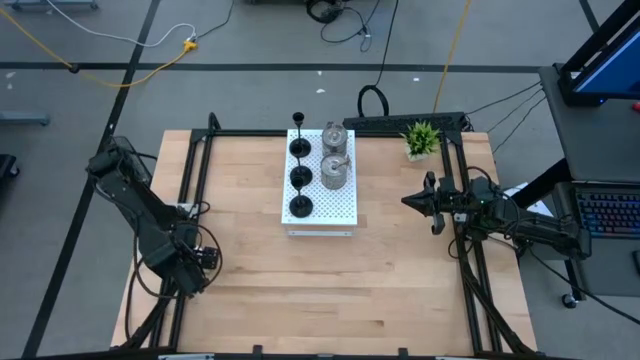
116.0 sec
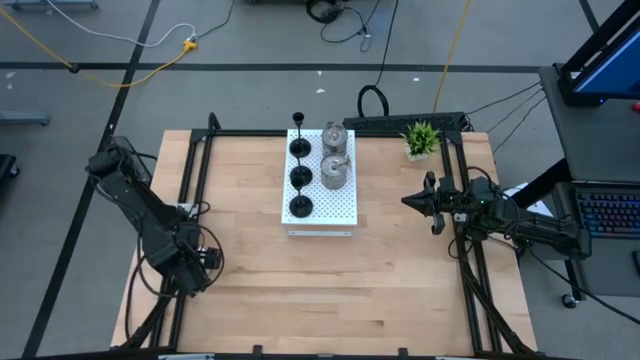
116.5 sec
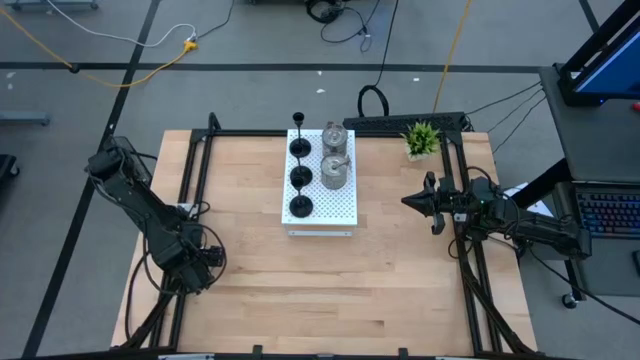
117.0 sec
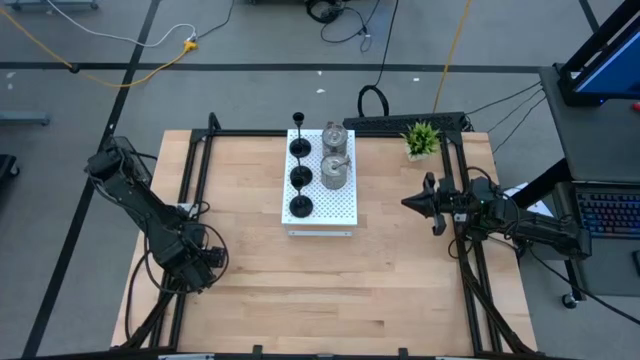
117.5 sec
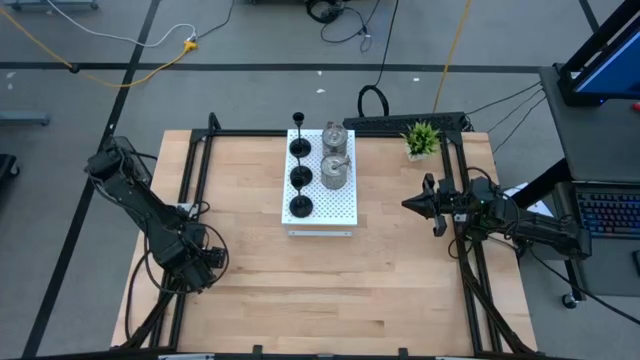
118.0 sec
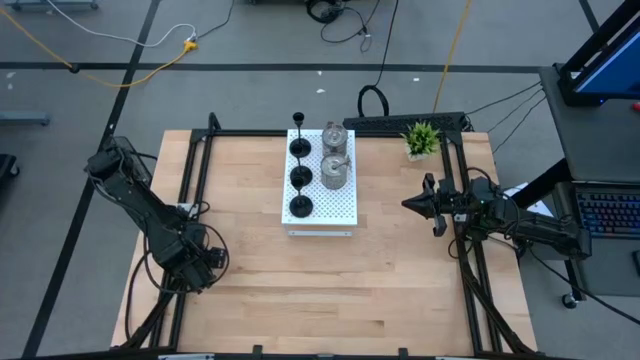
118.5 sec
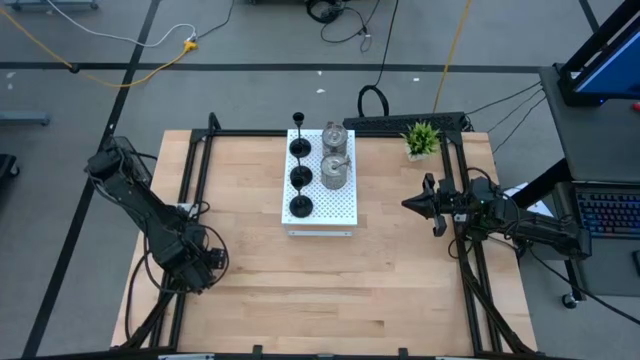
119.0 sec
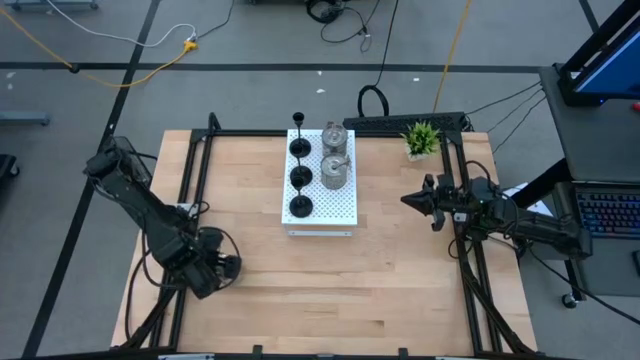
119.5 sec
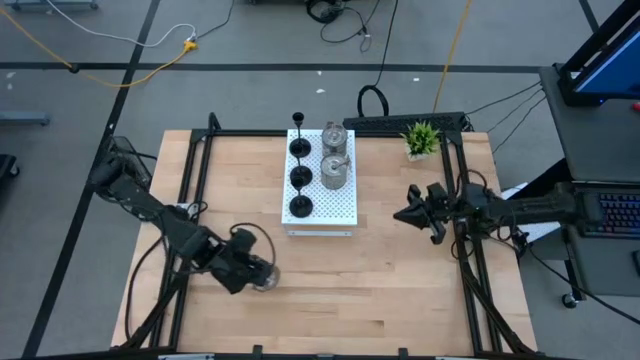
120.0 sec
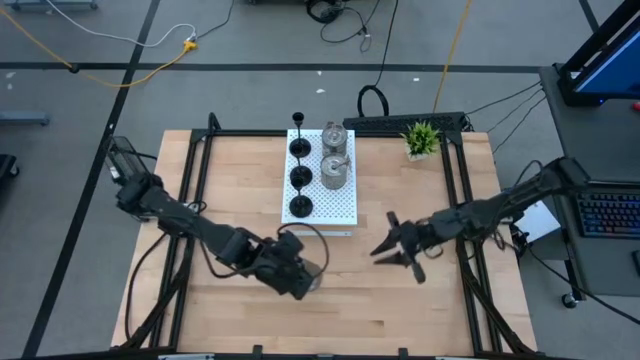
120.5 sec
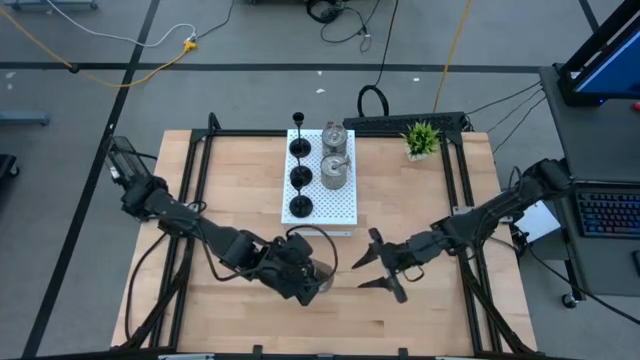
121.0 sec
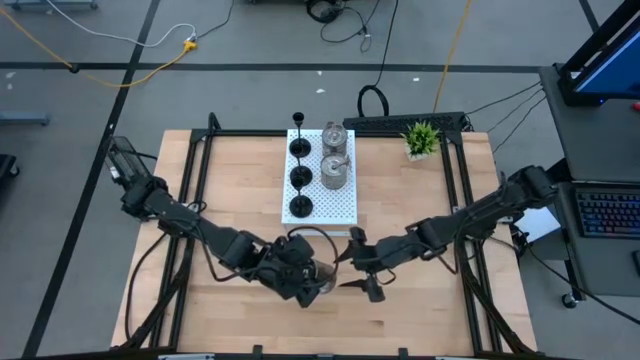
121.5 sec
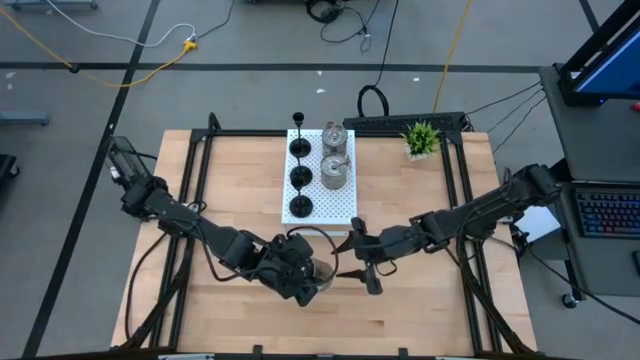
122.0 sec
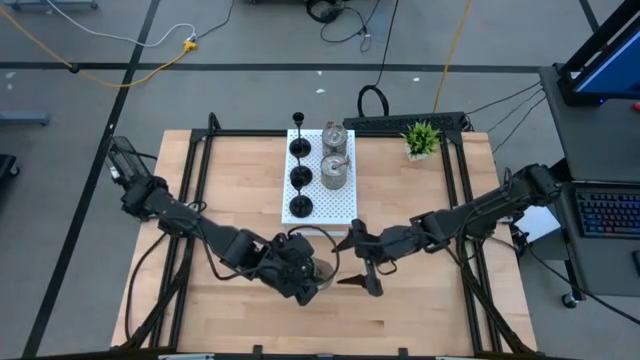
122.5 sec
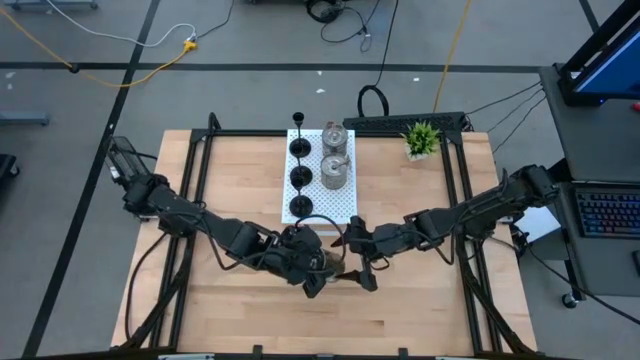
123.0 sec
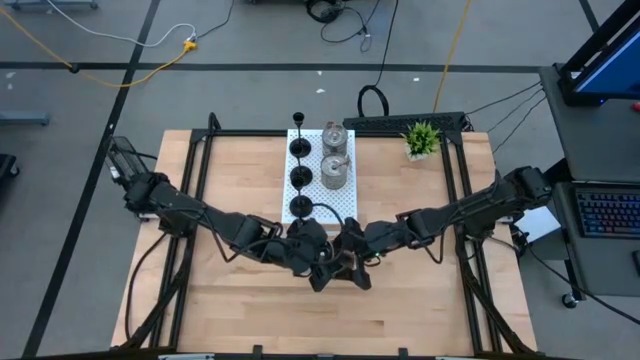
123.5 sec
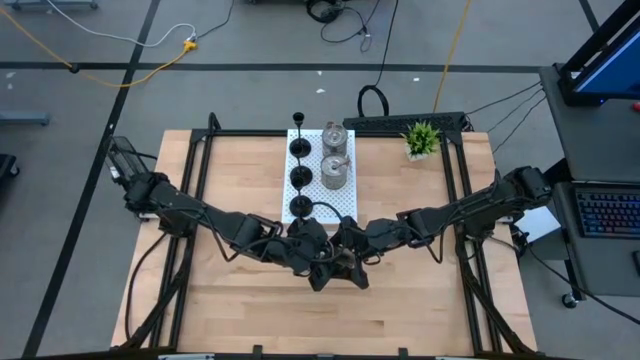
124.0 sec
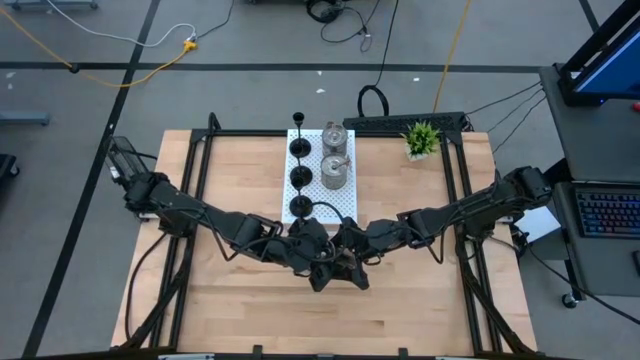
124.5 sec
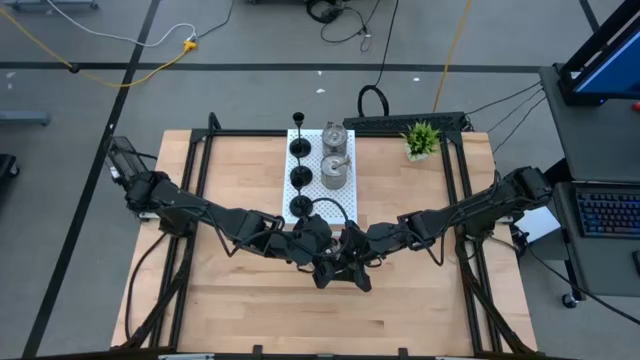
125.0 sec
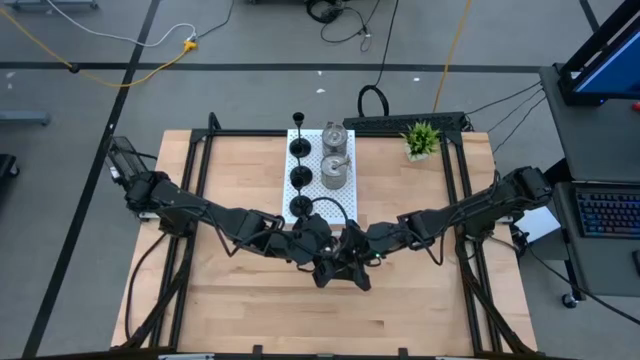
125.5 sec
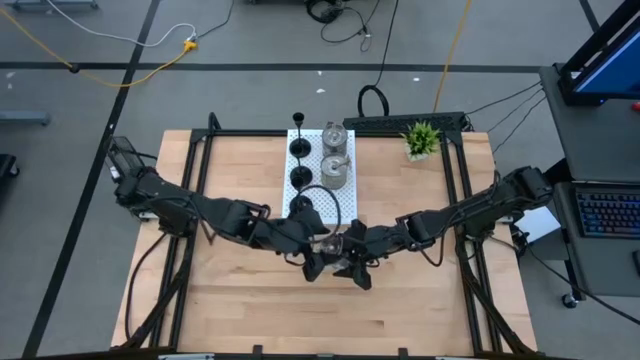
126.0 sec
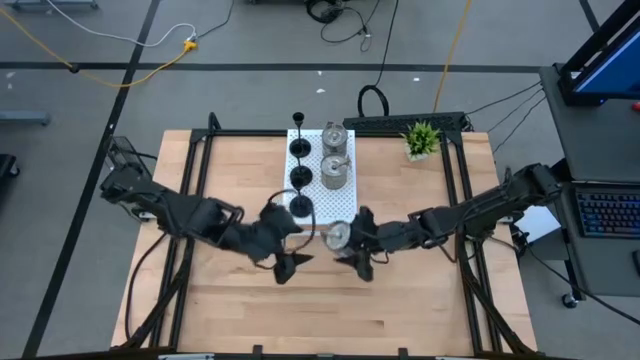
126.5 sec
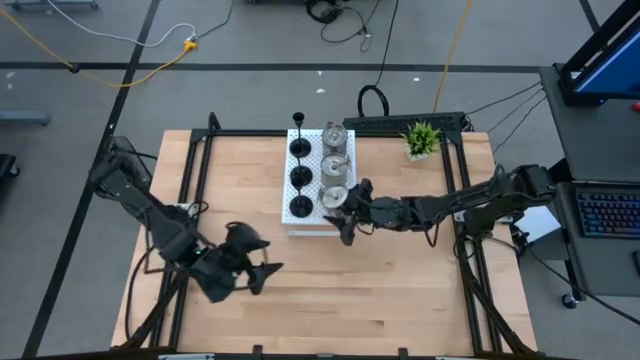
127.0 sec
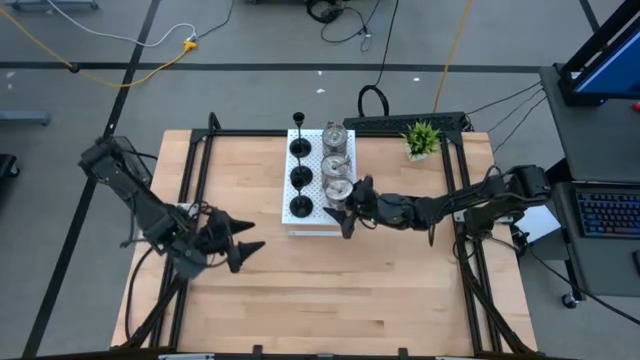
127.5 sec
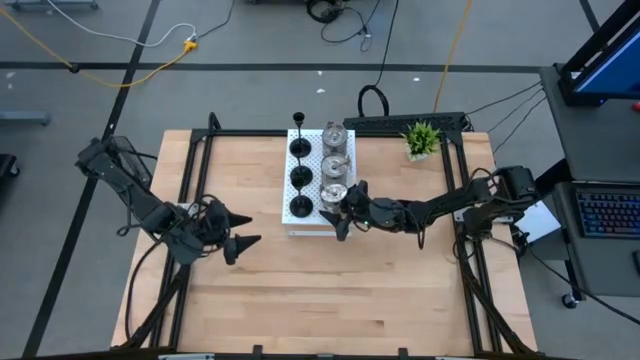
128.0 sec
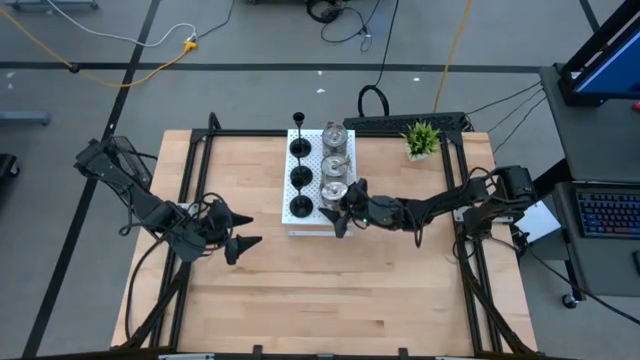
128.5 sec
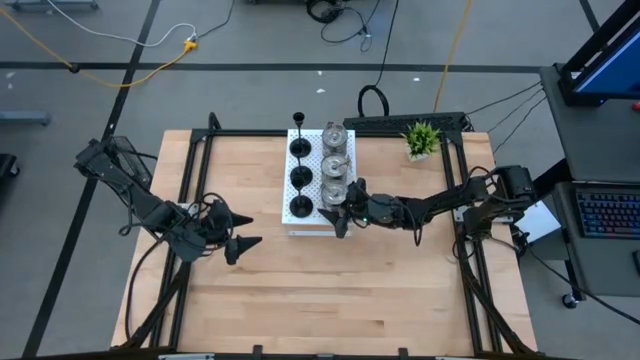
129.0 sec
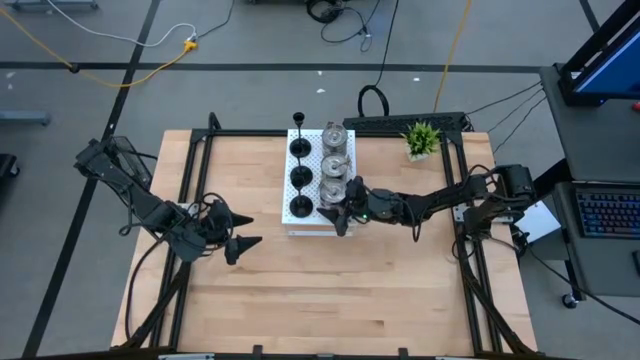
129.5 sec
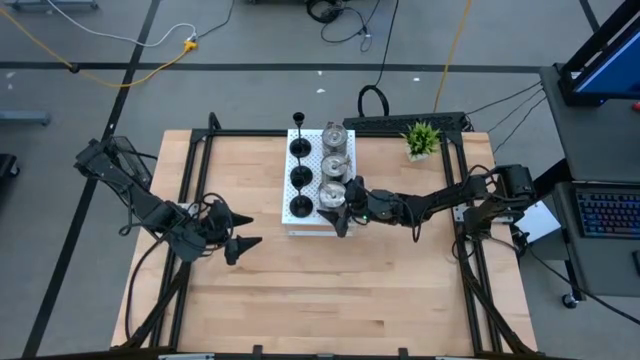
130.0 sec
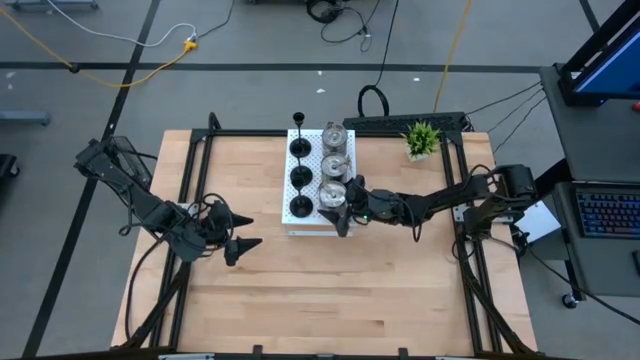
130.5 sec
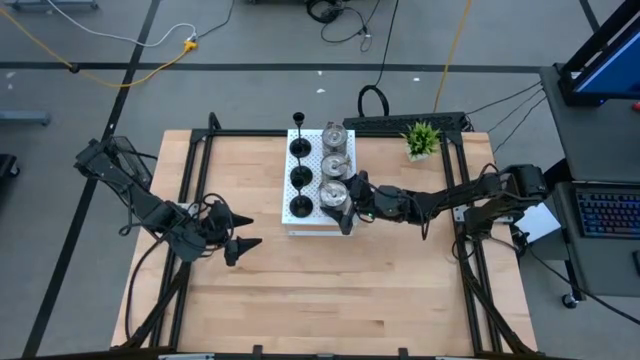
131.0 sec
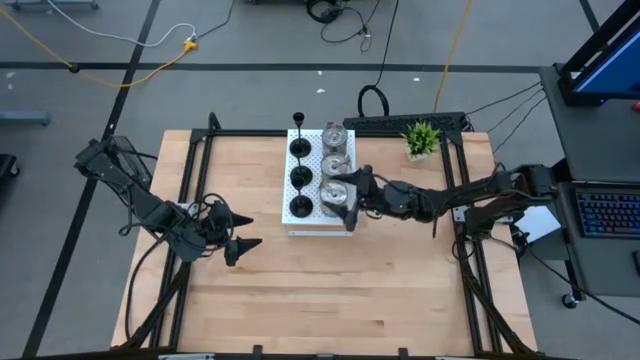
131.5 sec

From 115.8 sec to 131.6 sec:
Task: Pick & Place candle stick holders
Put the silver scented candles on the shelf aligned with the other silver scented candles

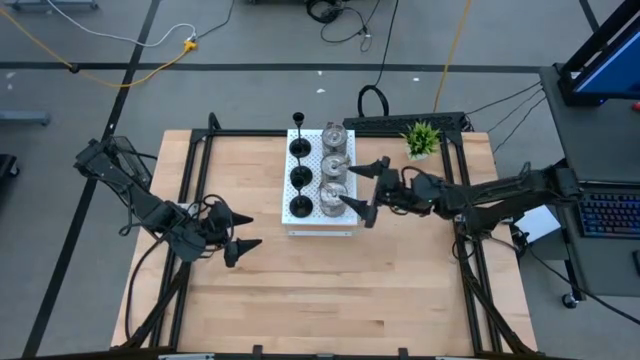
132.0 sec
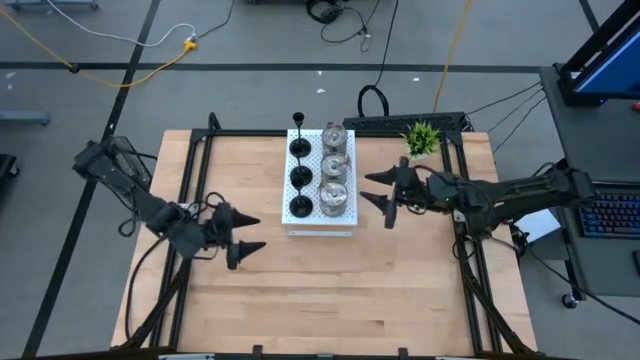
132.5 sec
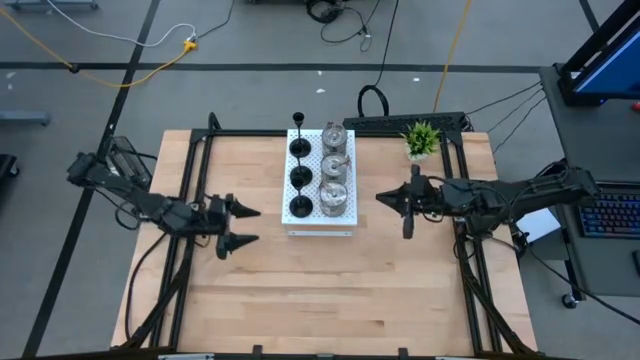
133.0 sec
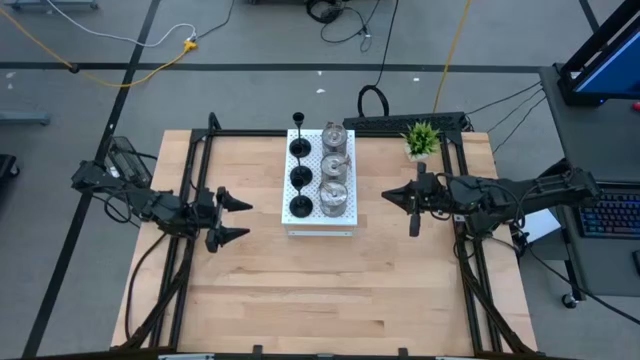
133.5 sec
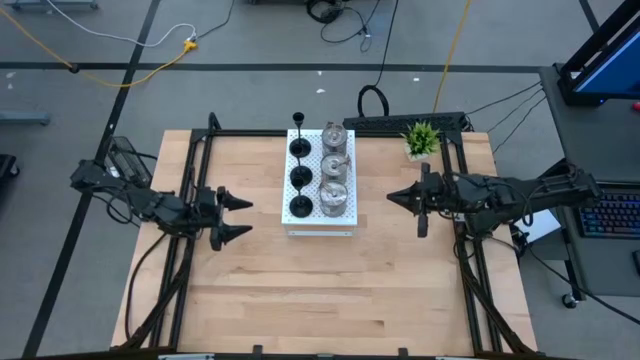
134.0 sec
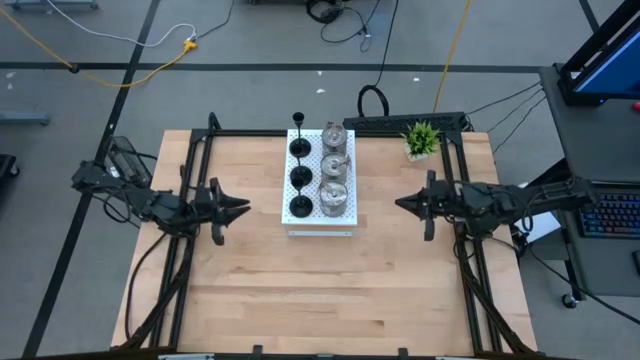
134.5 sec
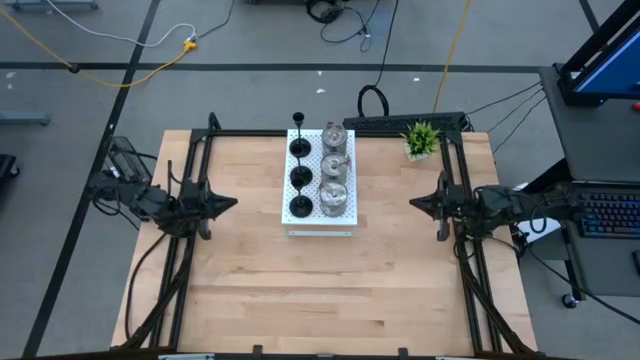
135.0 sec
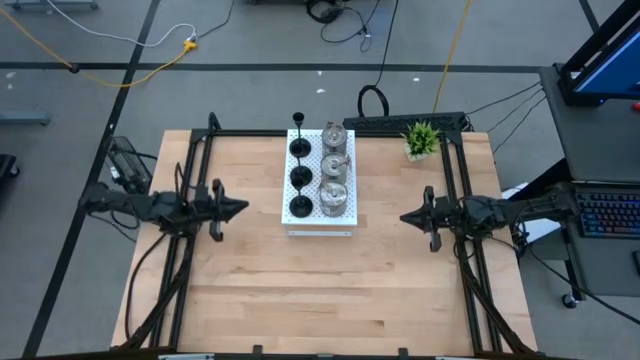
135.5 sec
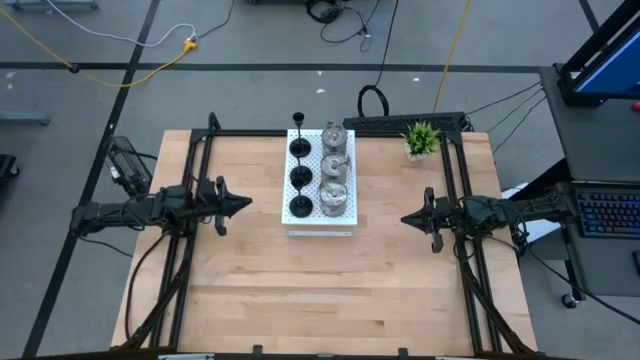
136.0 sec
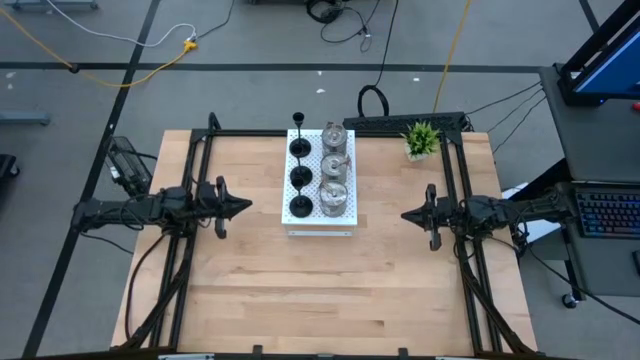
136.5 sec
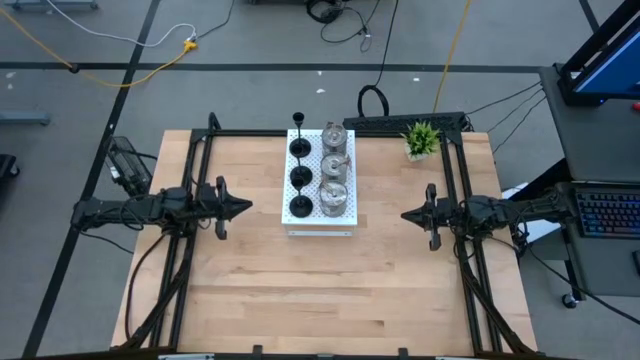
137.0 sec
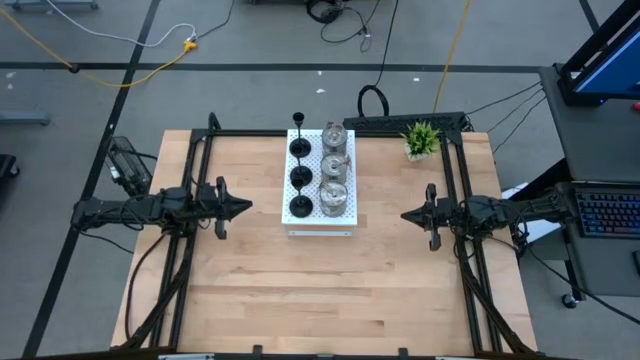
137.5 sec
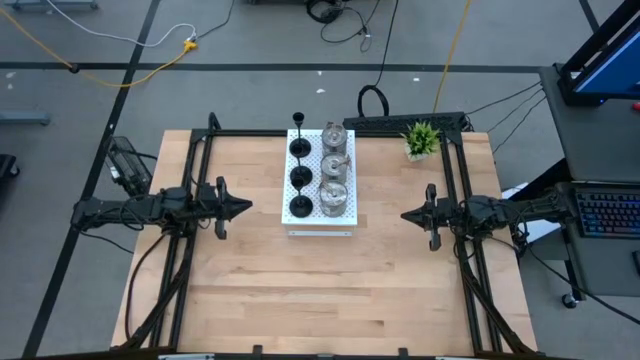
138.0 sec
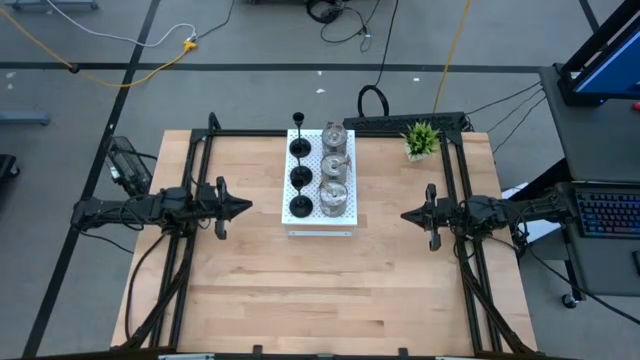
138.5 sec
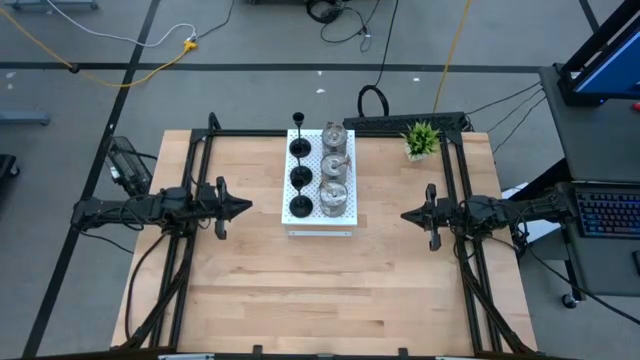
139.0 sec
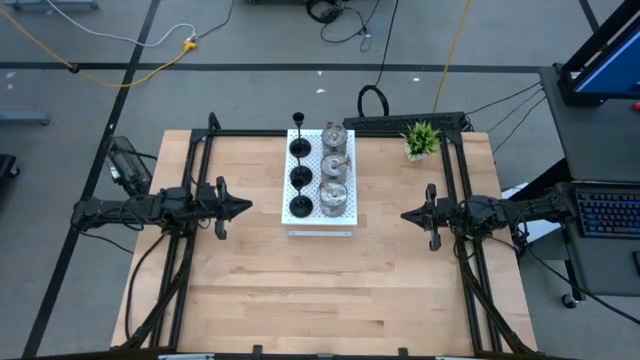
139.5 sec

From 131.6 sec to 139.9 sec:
Return to Home Position
